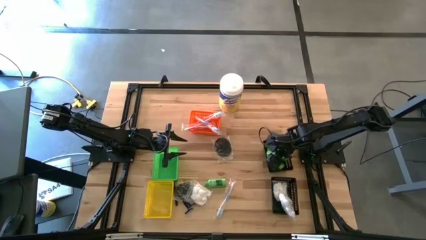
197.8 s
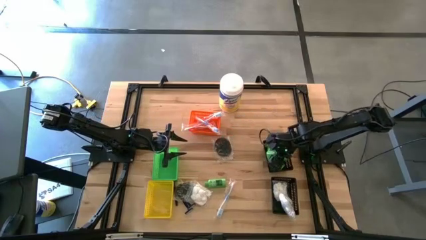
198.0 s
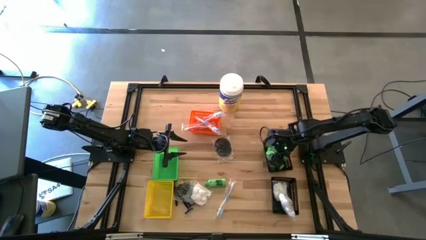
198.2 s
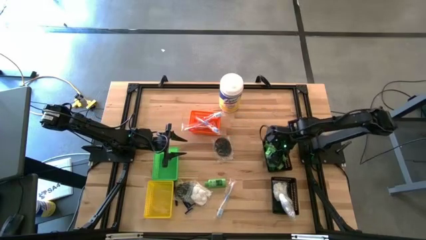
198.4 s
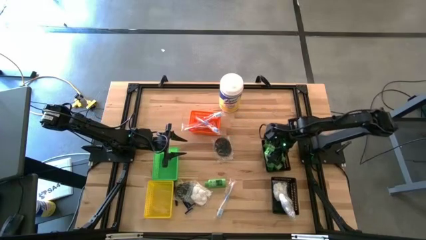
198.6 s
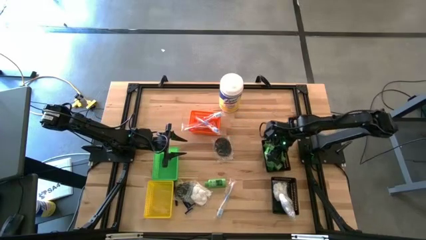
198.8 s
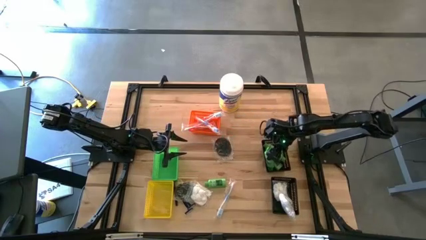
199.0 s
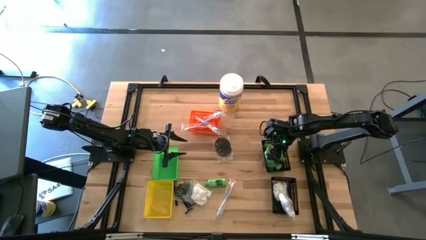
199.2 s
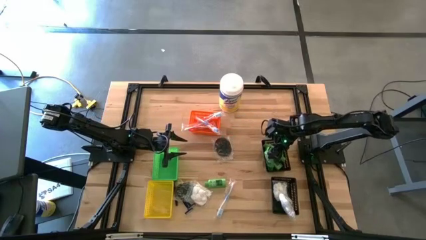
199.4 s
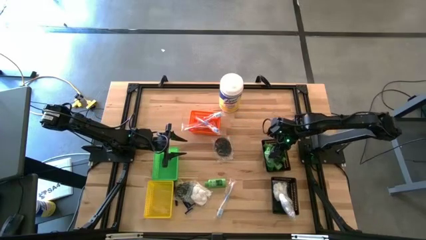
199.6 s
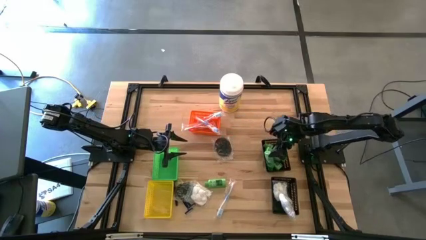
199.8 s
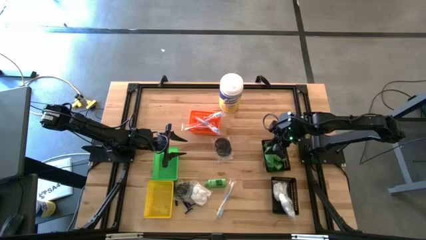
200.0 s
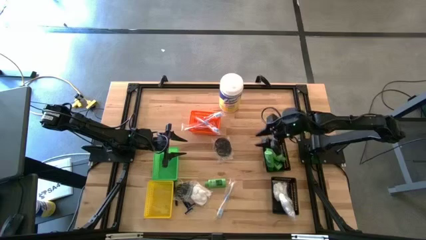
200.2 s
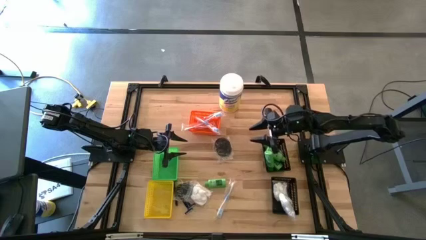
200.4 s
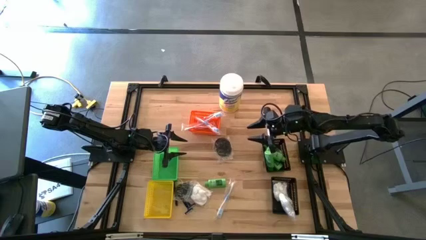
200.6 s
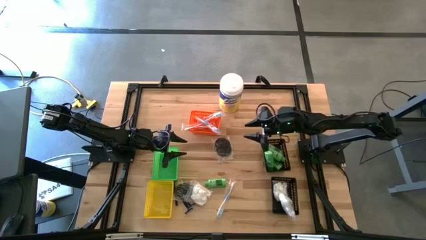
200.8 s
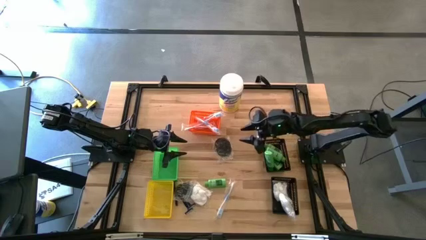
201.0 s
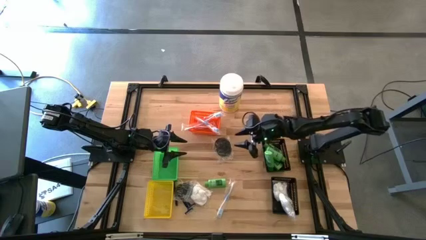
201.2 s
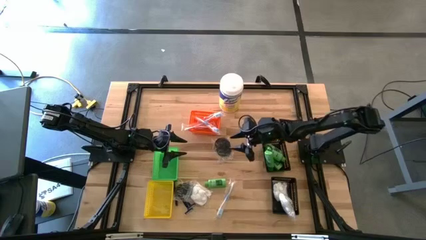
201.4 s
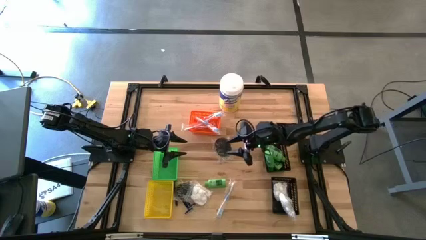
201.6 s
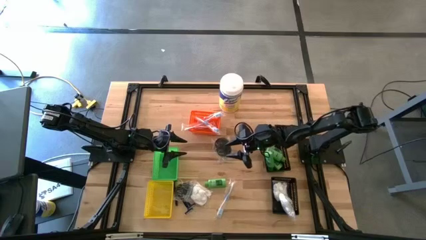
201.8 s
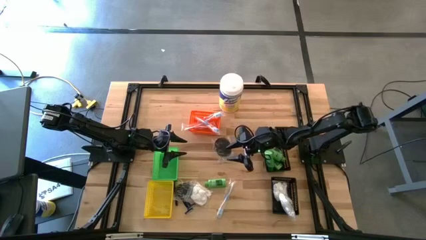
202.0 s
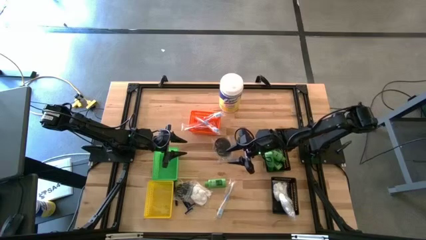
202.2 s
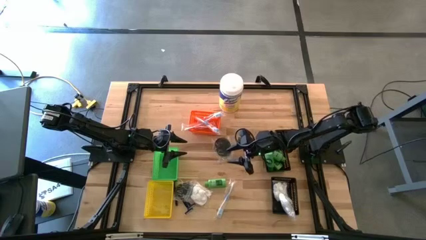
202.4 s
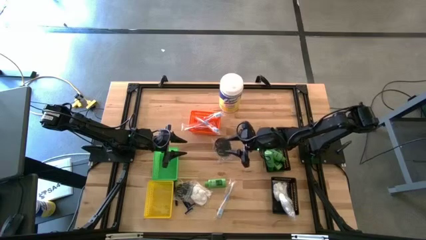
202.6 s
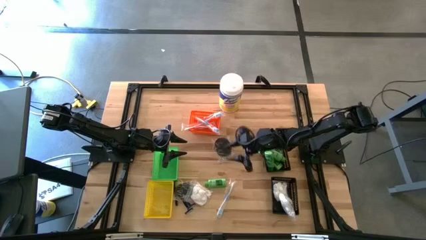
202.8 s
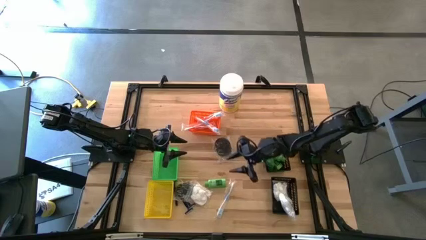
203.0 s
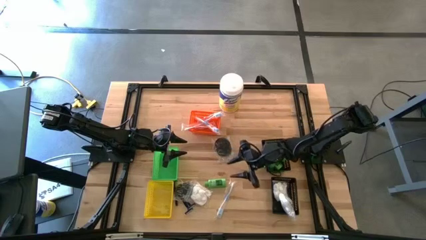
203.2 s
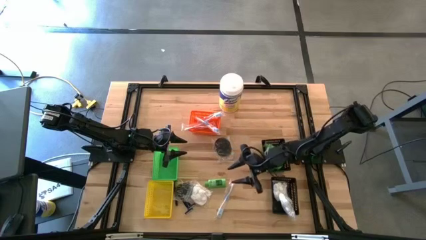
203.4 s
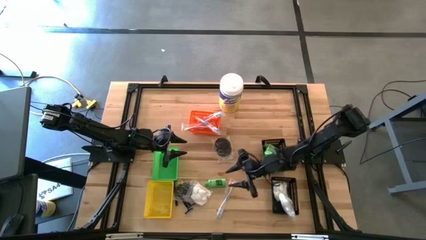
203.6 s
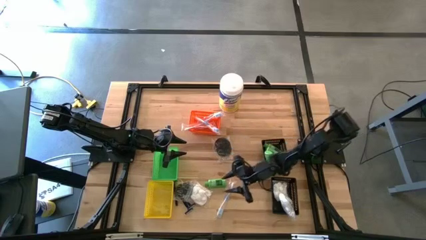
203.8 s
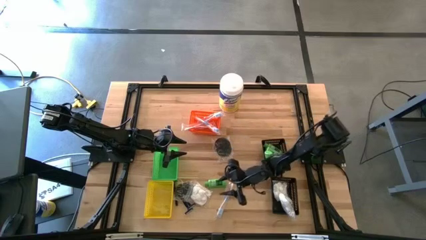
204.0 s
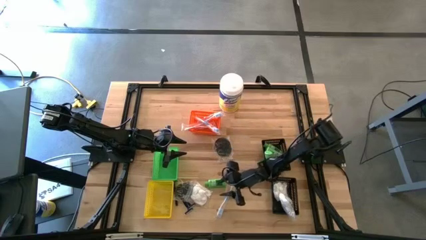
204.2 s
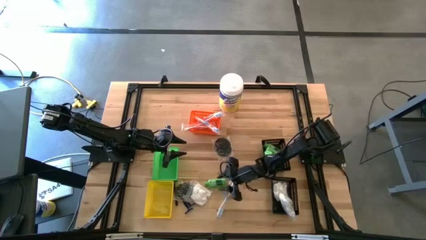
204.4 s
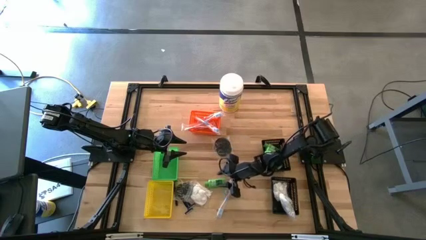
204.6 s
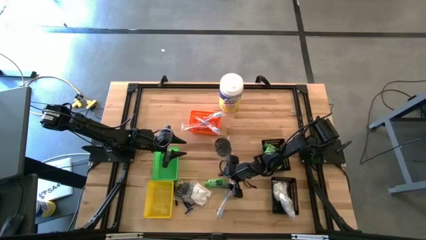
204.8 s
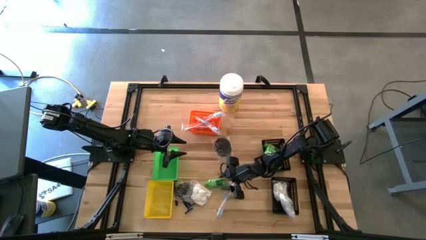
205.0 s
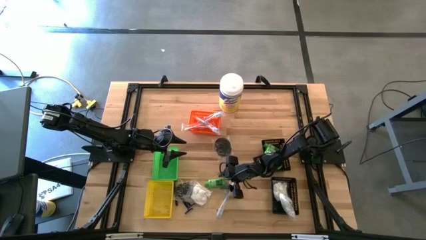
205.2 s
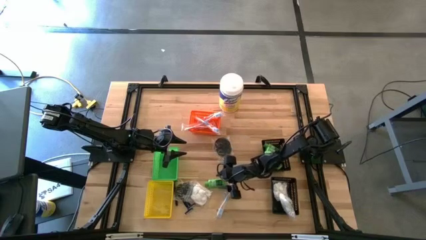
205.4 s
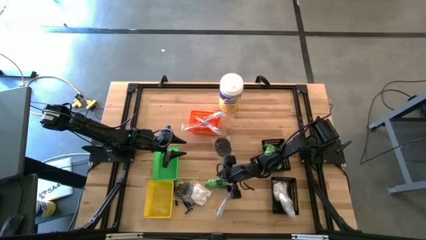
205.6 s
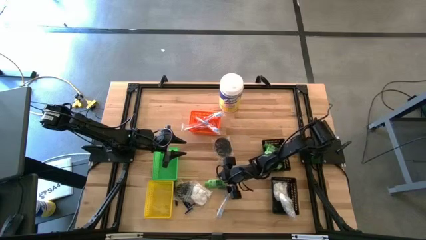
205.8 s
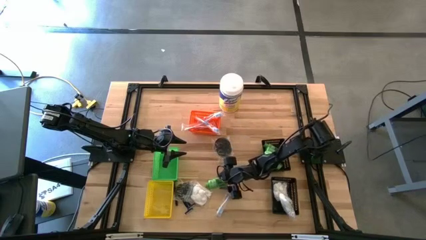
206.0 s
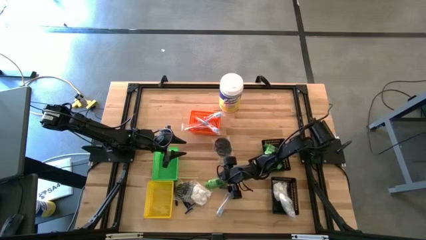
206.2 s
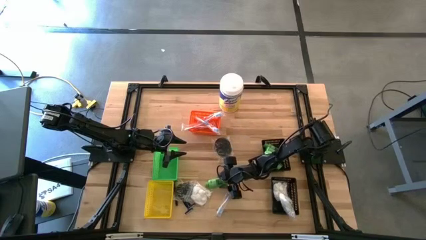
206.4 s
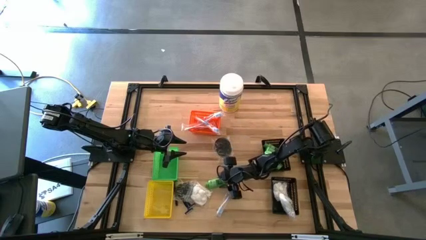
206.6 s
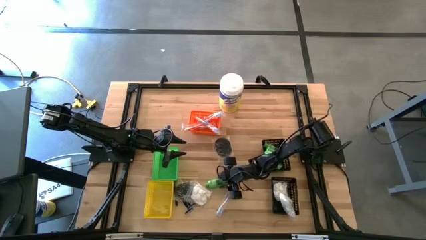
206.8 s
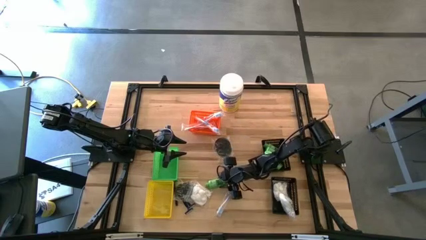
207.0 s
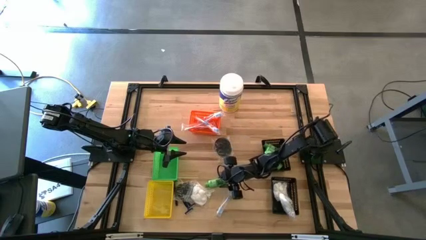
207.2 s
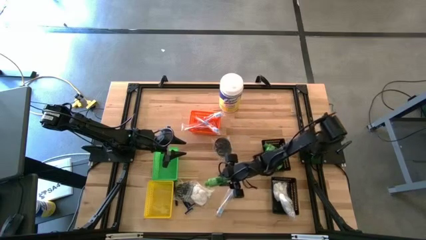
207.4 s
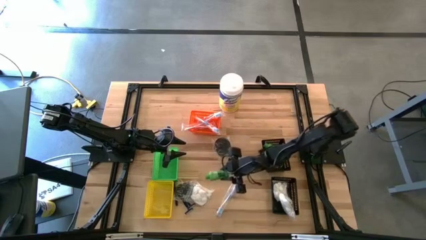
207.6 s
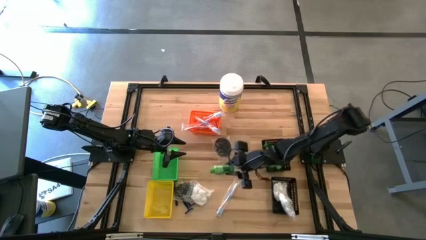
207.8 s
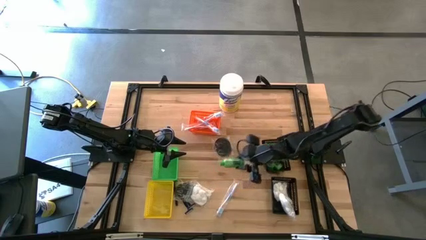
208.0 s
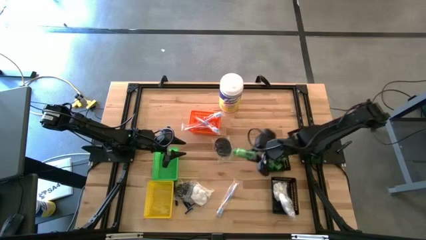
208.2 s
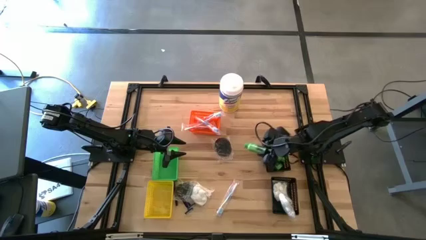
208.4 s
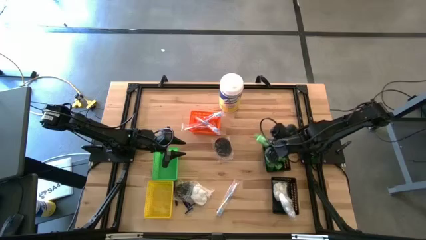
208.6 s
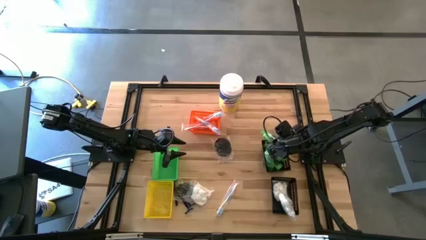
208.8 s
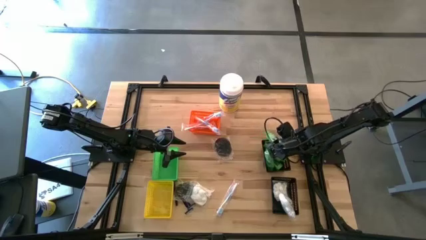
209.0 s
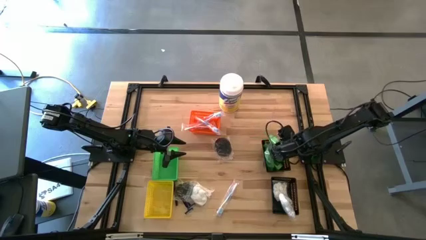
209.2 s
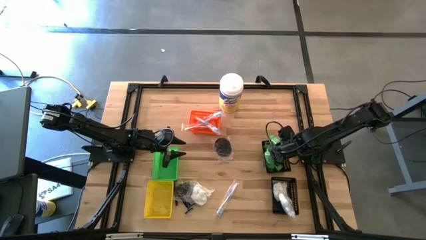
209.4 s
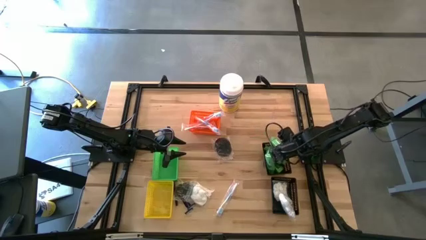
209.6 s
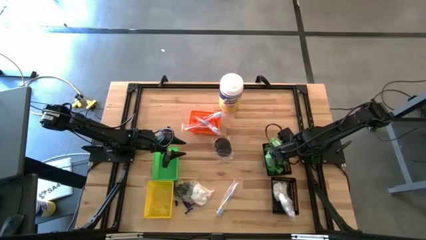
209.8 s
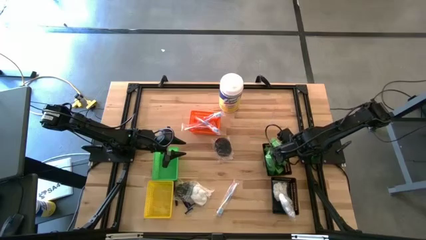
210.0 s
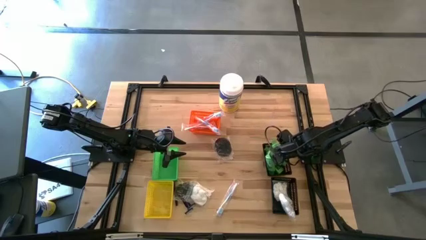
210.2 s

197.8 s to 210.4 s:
Task: Pick & Place Travel size toiletries
Put the green shampoo into the top black bin

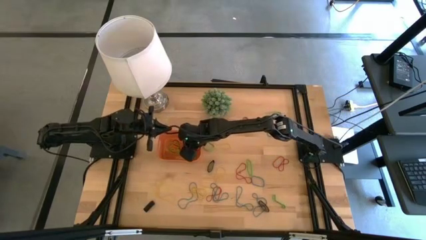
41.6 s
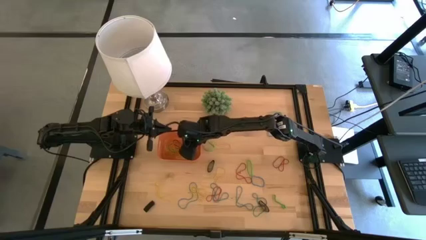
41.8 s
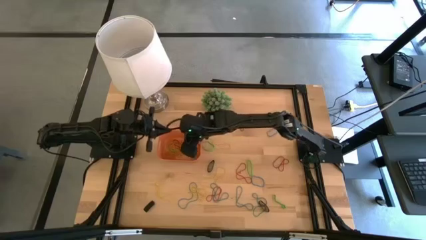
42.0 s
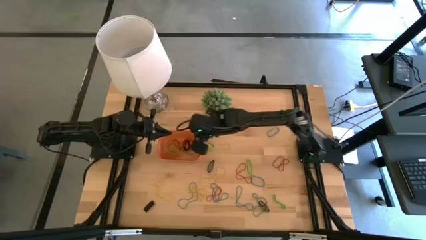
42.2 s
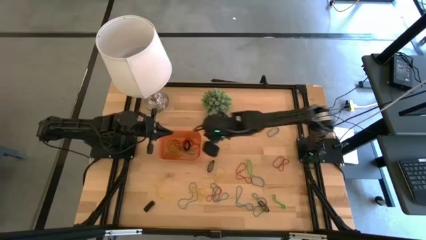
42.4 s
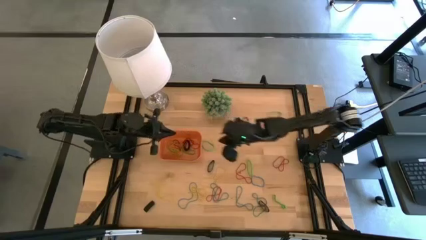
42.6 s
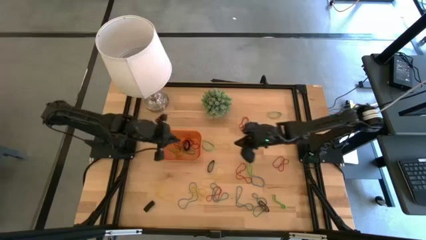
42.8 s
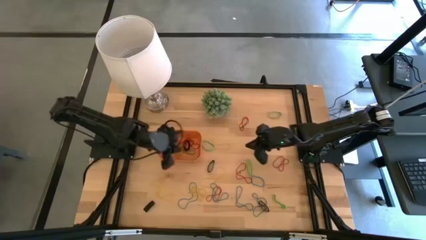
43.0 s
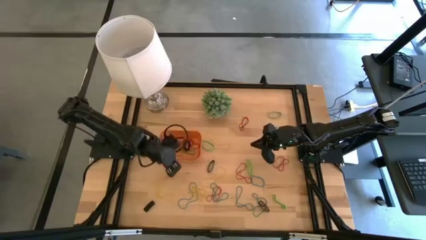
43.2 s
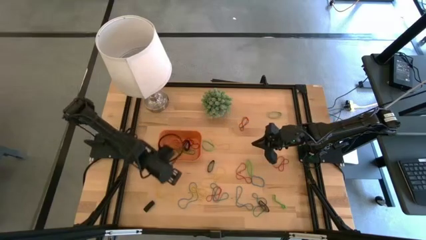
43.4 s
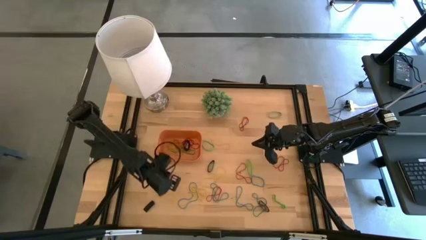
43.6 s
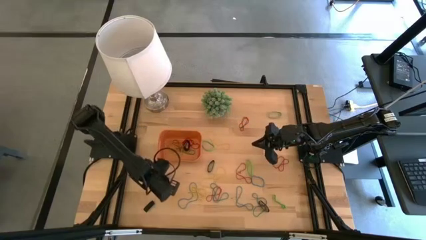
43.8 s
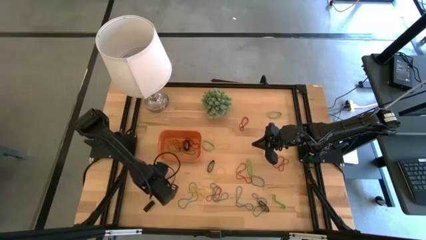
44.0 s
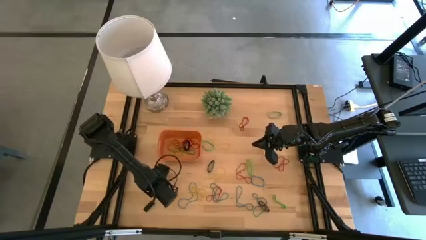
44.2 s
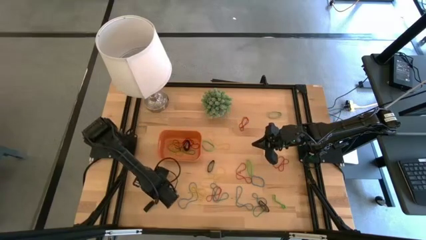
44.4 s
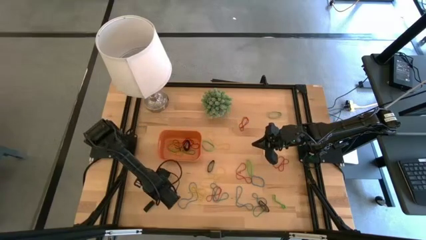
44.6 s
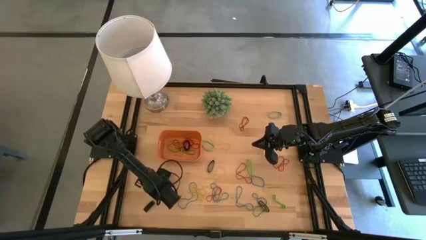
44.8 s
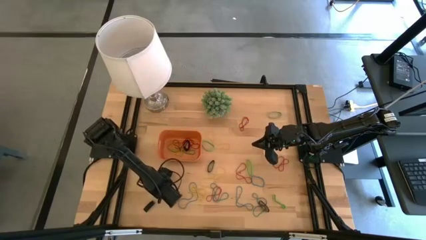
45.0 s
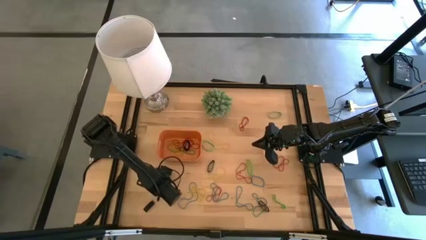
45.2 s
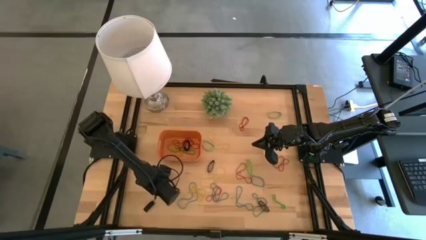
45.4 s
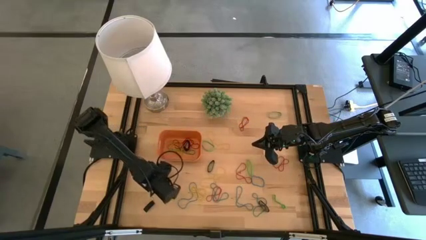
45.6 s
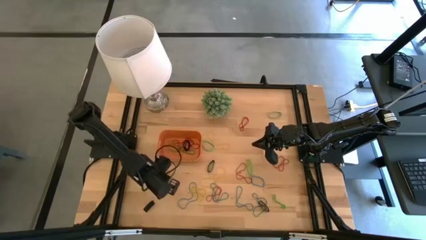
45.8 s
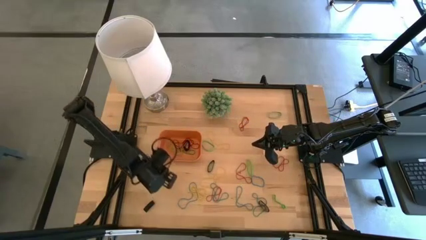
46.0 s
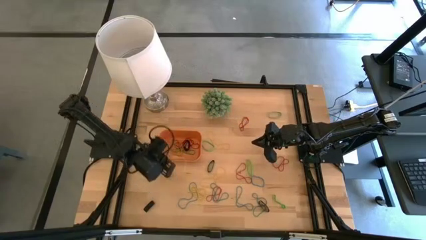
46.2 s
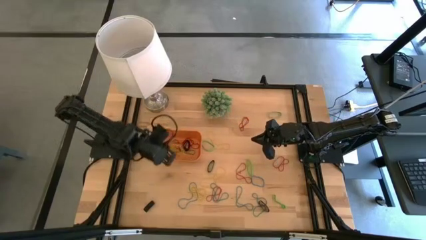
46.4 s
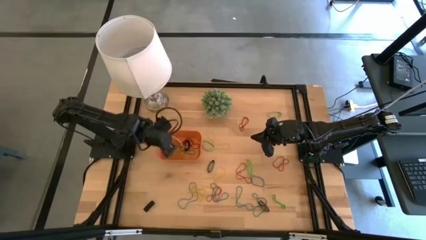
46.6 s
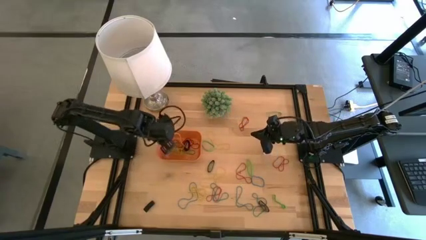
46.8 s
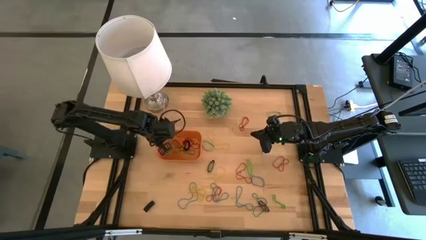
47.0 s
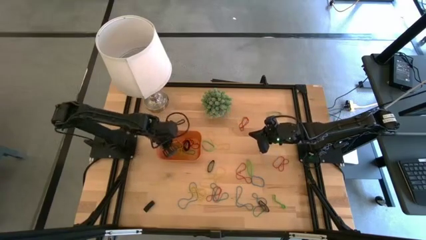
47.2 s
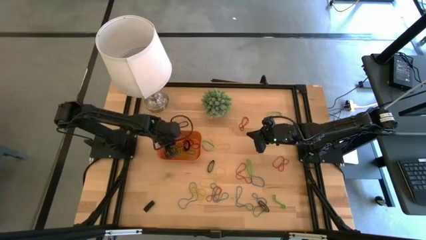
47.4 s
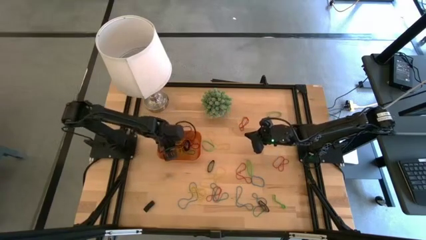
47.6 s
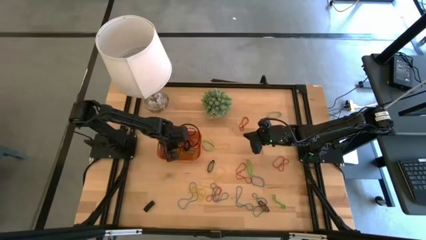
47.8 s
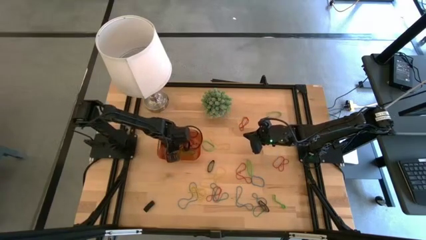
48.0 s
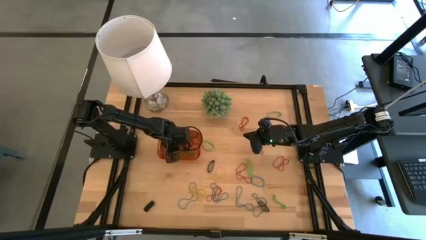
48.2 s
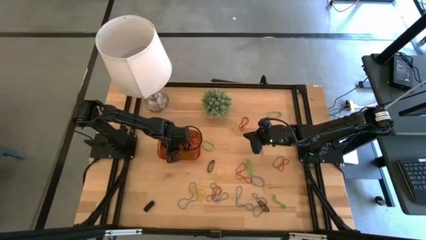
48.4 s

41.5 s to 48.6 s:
Task: Pick and place rubber bands into bin
Put the yellow rubber band into the orange bin
